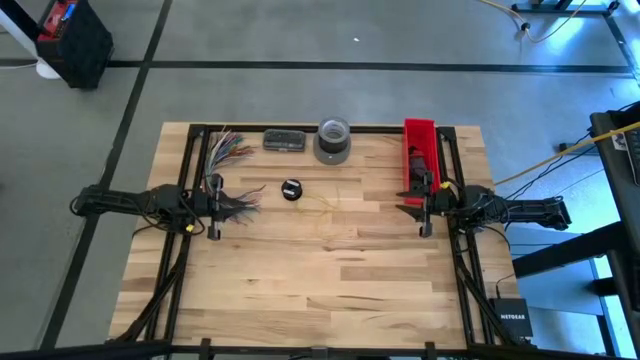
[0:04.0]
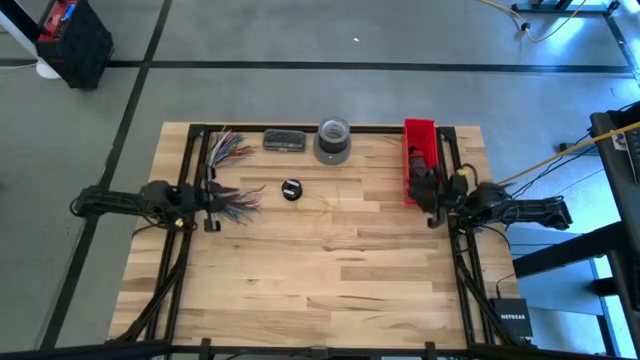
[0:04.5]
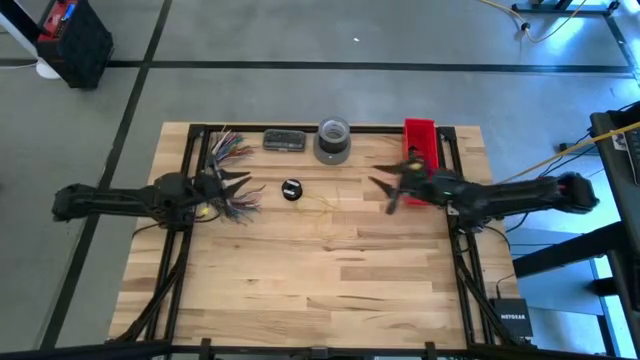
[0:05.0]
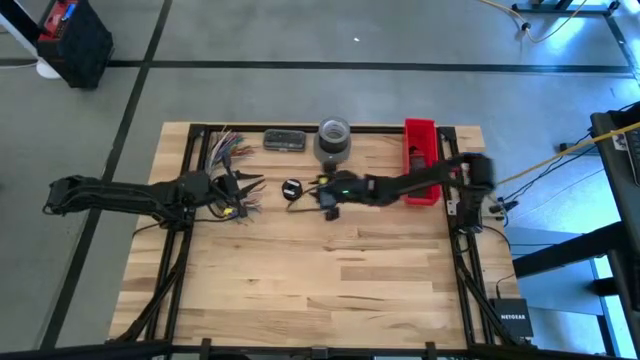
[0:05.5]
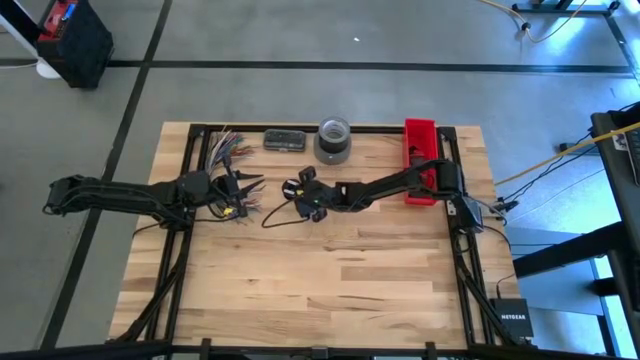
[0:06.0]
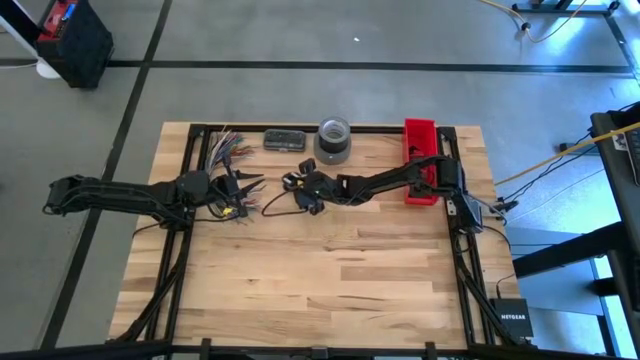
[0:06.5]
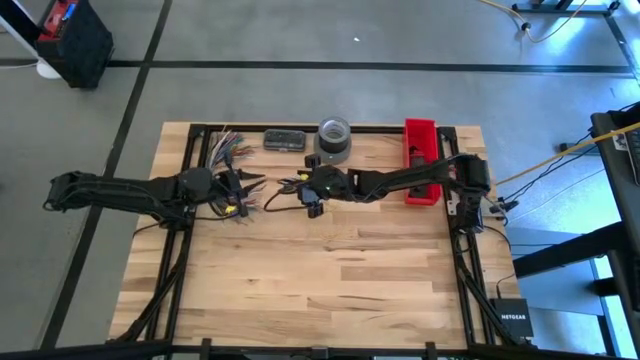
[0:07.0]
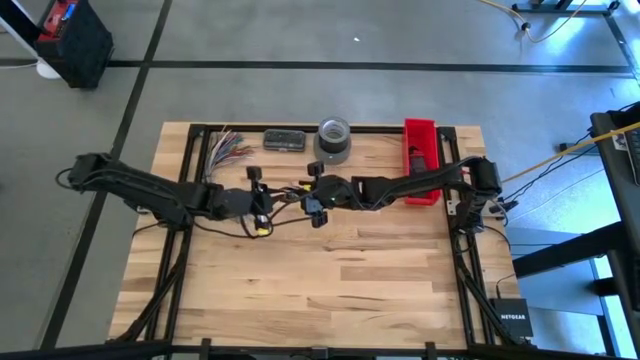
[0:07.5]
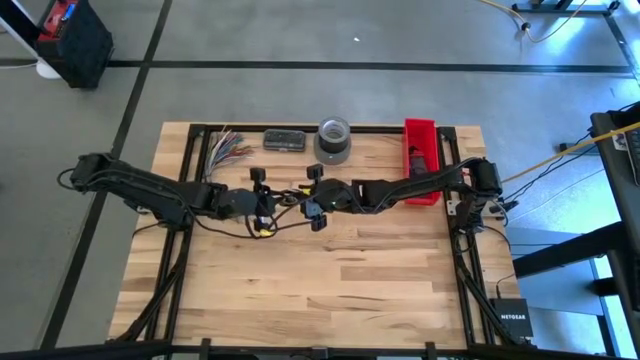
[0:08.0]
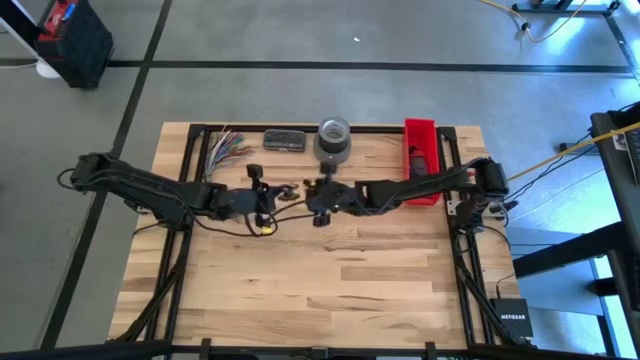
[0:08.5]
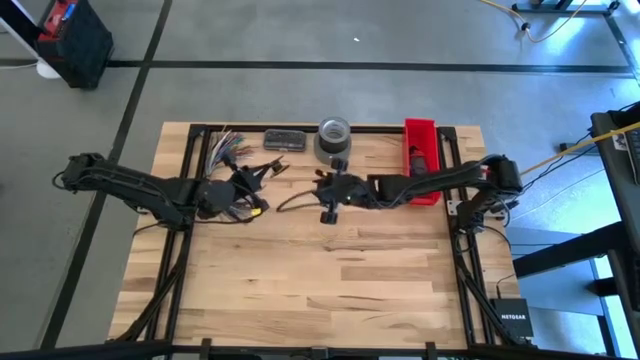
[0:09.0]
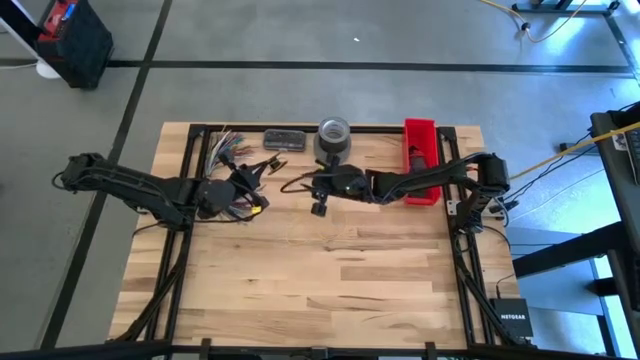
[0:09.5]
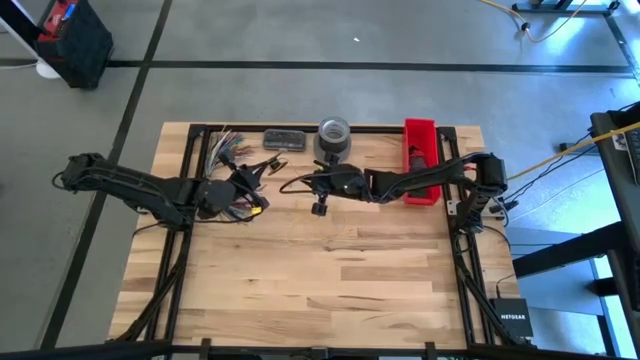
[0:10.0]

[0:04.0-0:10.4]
Task: Coil cords
Coil the yellow wire on the spool

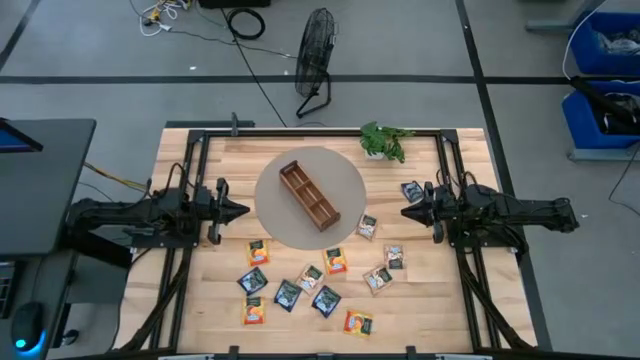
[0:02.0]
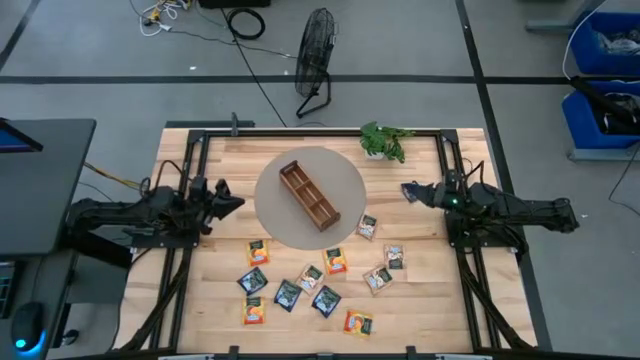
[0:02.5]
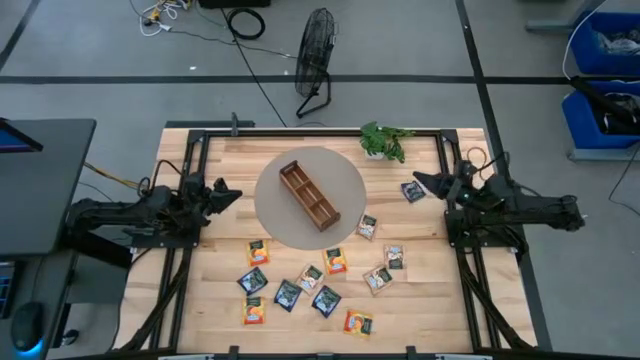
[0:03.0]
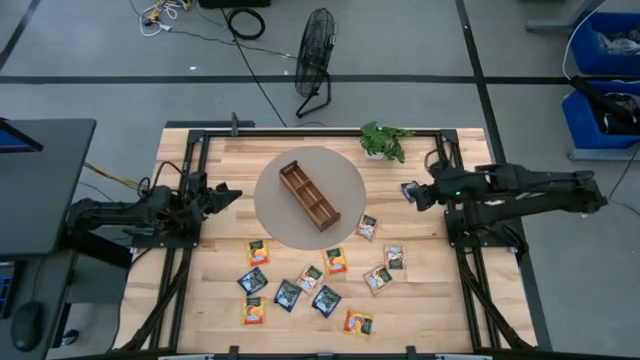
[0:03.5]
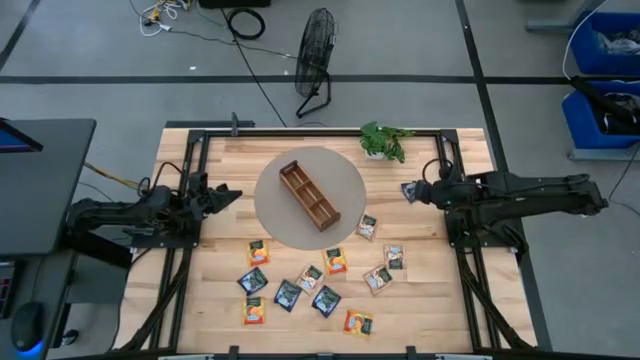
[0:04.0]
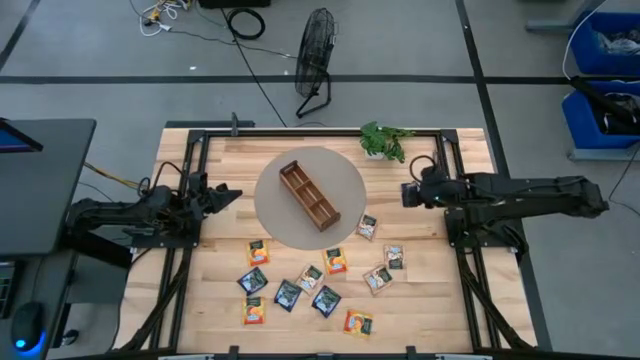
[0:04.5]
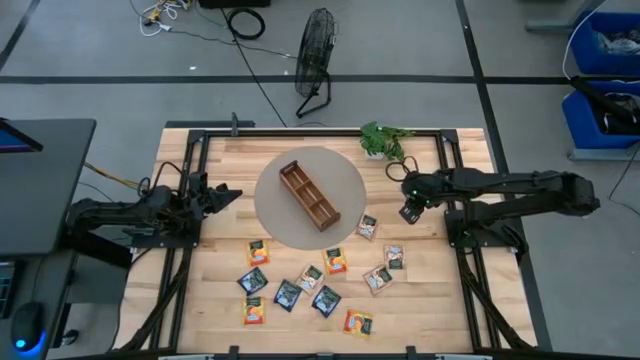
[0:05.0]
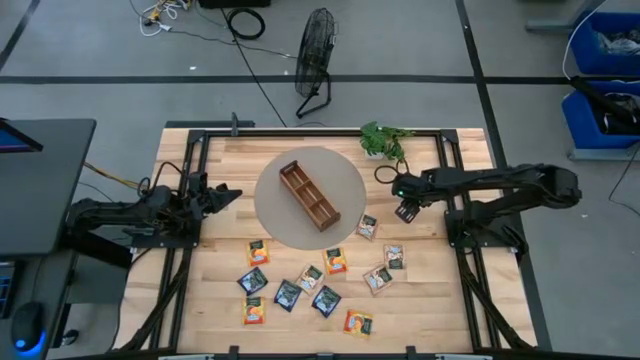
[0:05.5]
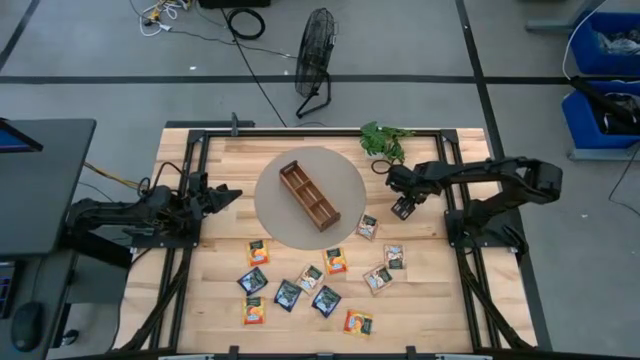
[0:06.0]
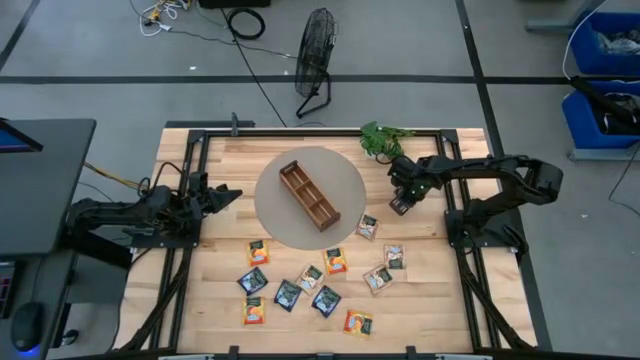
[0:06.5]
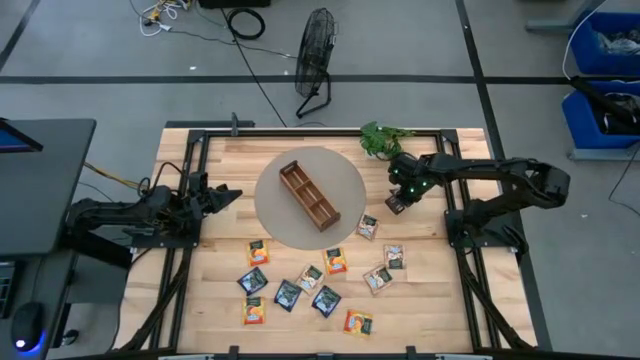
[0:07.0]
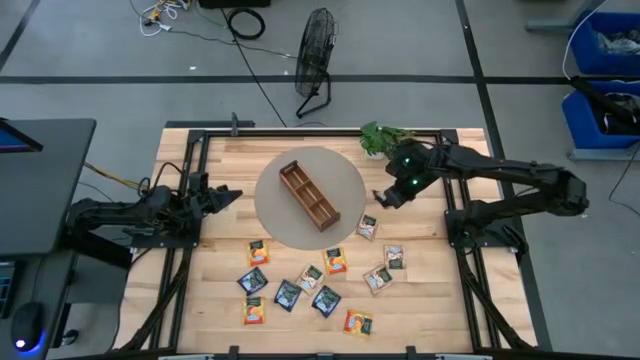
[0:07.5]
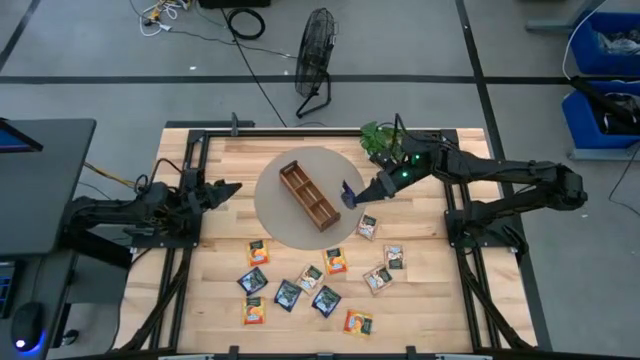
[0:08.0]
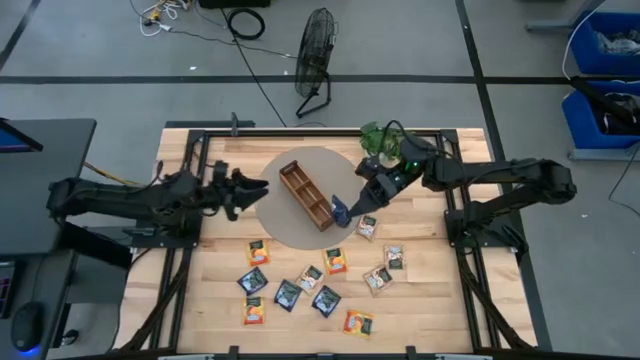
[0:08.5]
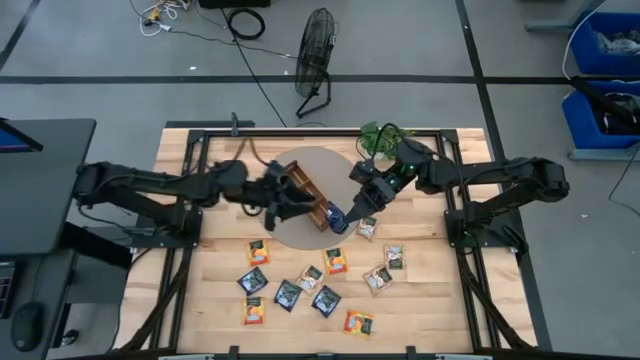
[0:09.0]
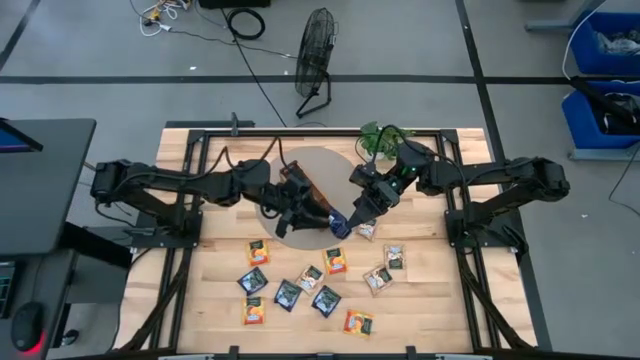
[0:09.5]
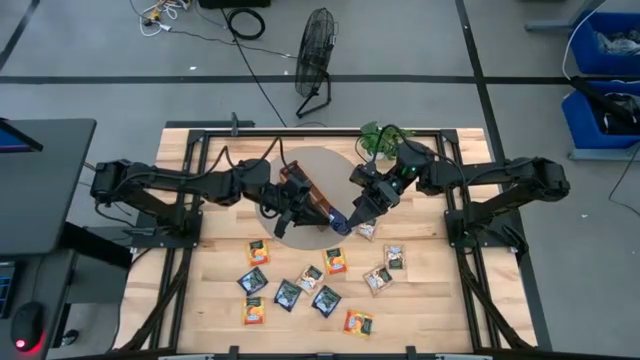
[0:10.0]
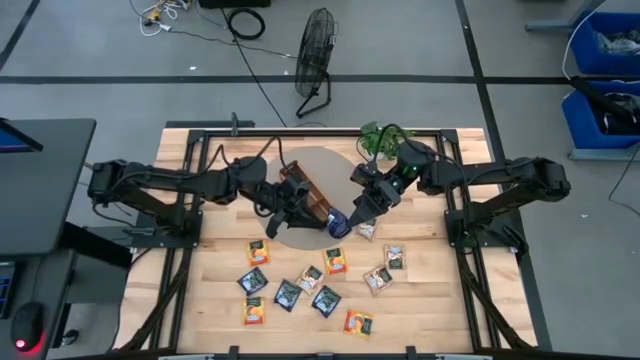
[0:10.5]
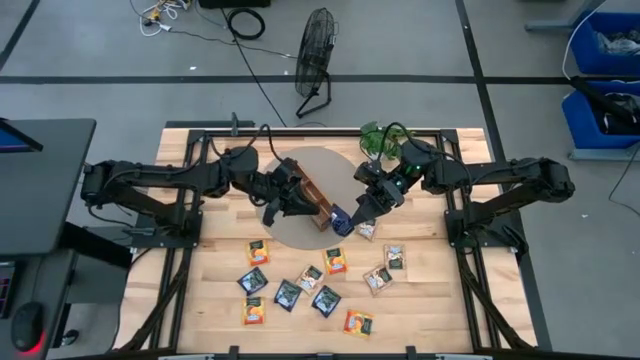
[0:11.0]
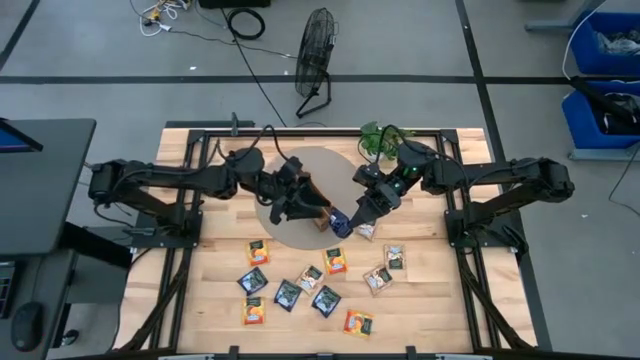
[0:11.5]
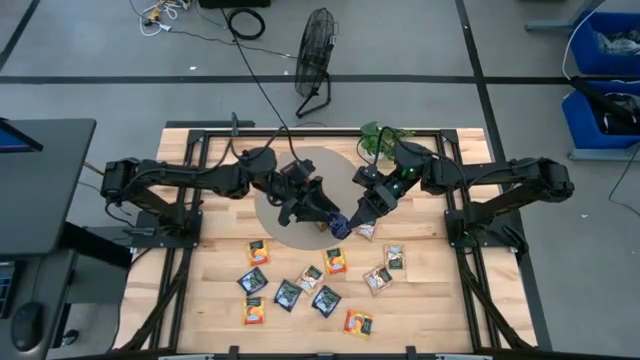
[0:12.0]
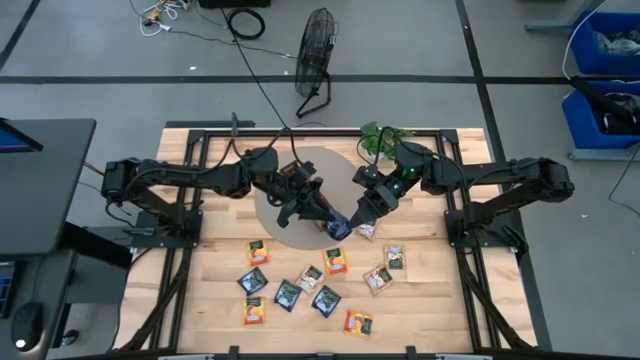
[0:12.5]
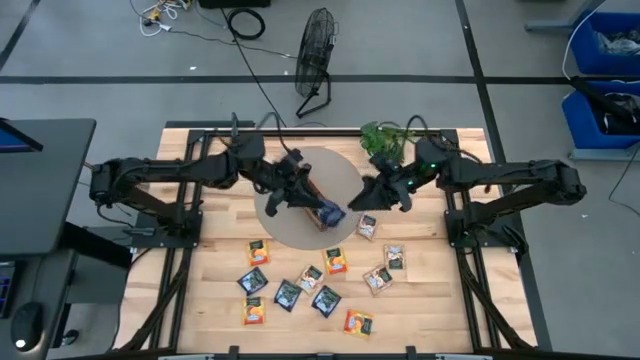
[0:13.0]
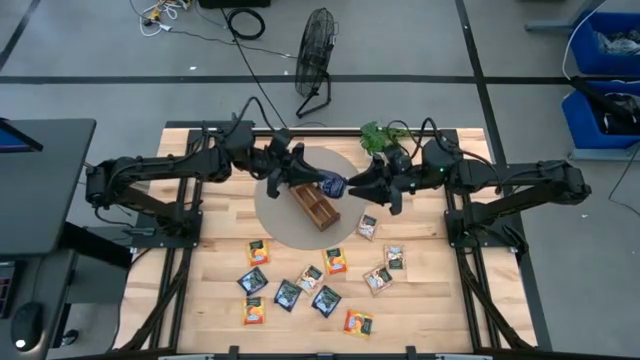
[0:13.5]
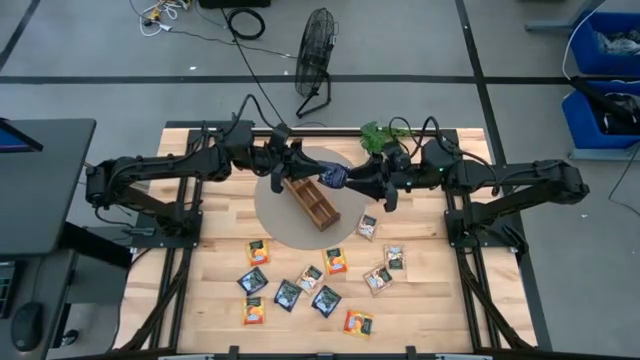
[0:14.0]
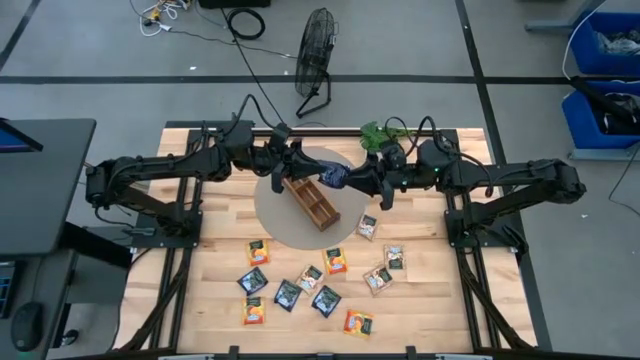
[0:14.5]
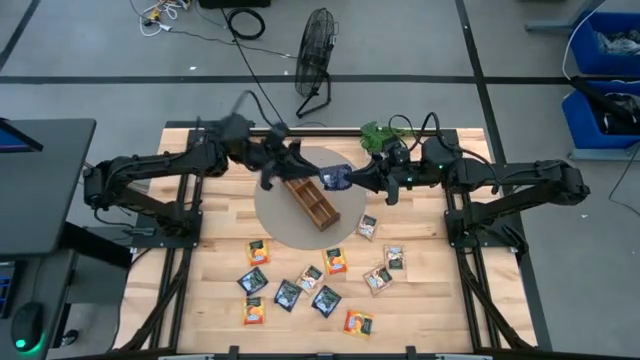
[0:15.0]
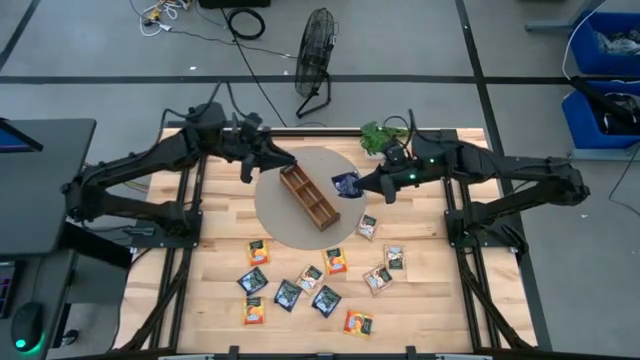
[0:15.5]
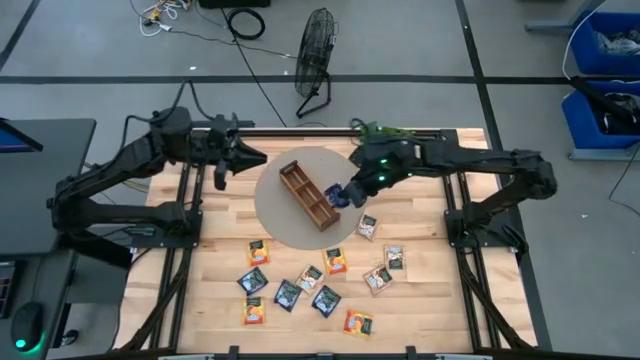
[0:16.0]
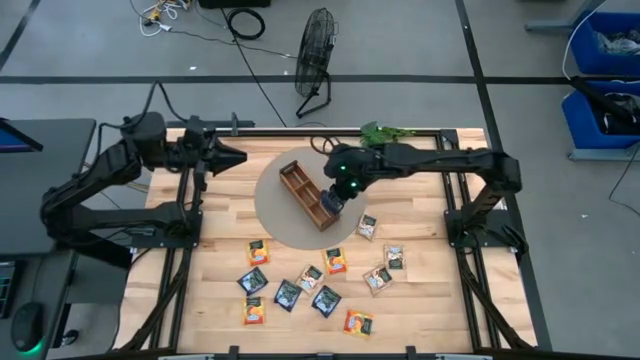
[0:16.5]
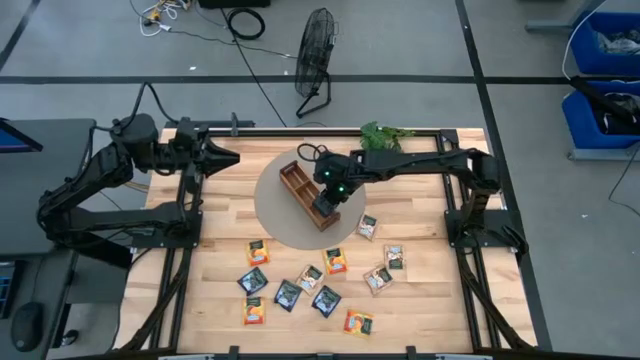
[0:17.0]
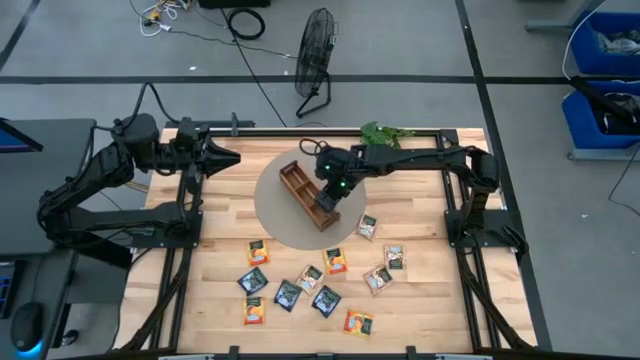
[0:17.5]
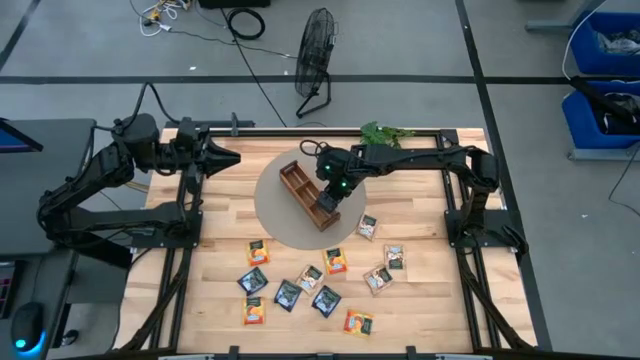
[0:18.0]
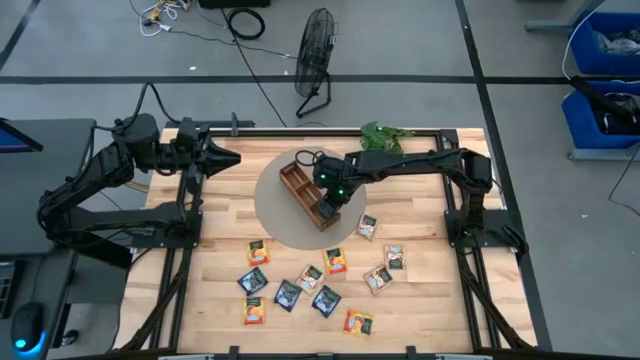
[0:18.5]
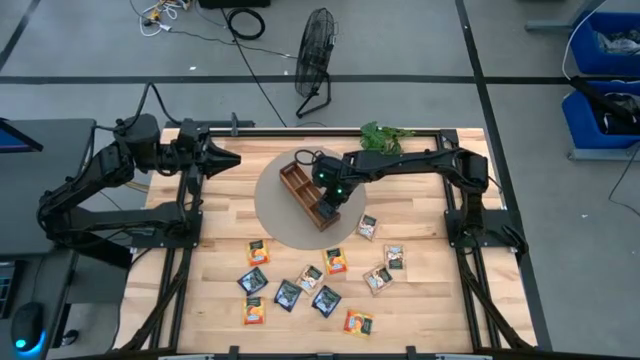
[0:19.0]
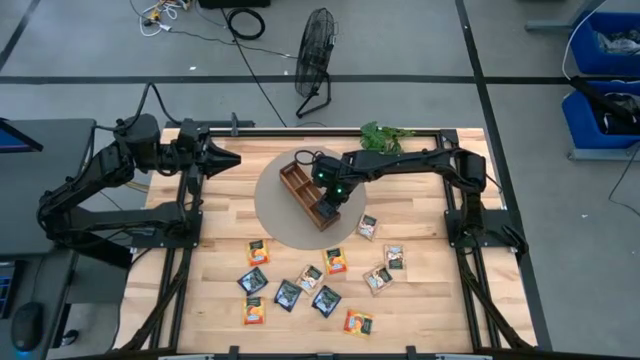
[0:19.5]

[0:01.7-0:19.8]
Task: Pick & Place Tea
Put the purple tea bag into the right section of the wooden organizer
